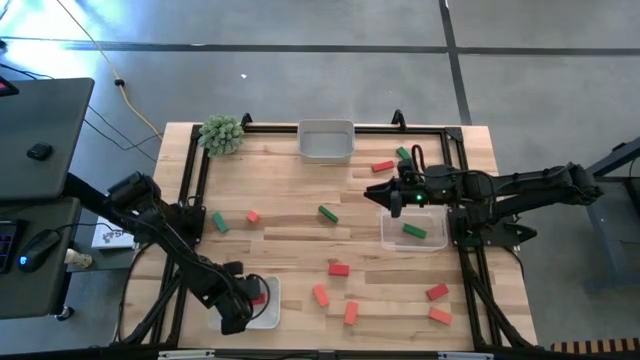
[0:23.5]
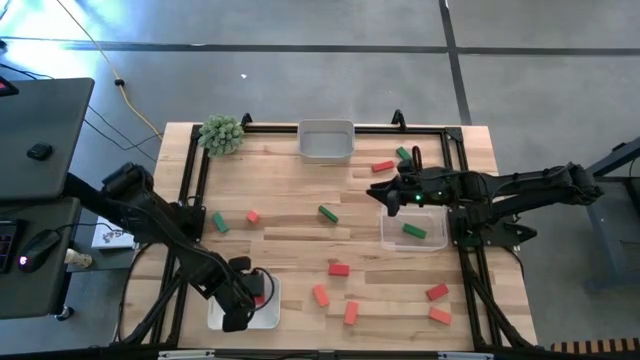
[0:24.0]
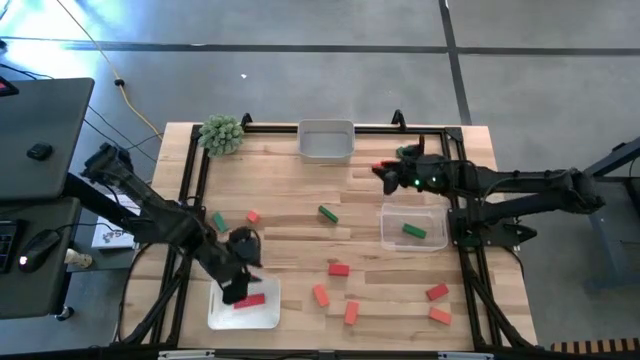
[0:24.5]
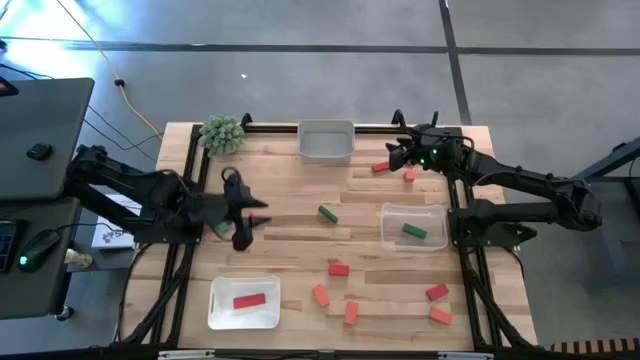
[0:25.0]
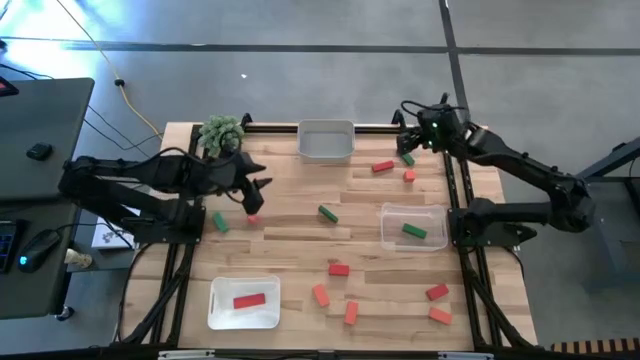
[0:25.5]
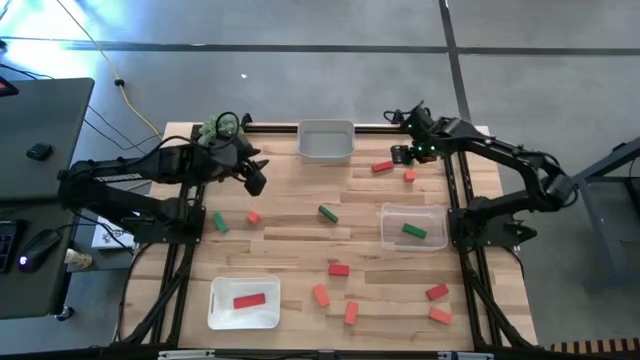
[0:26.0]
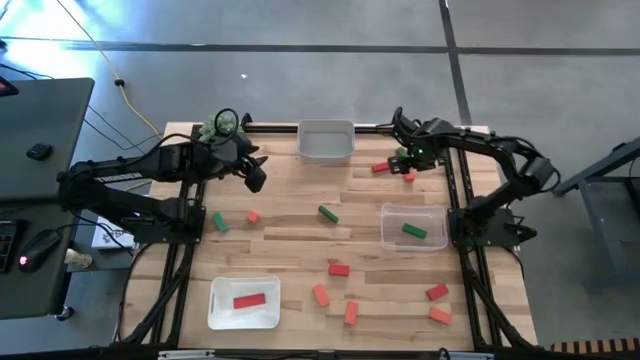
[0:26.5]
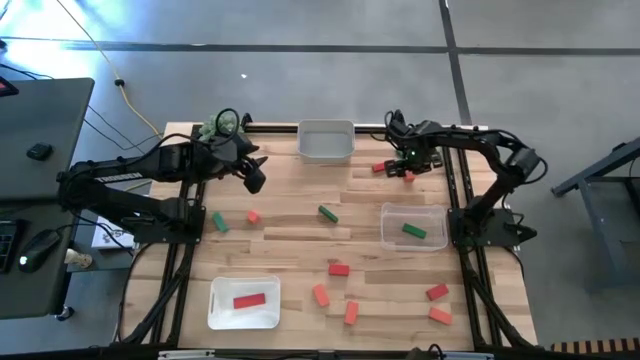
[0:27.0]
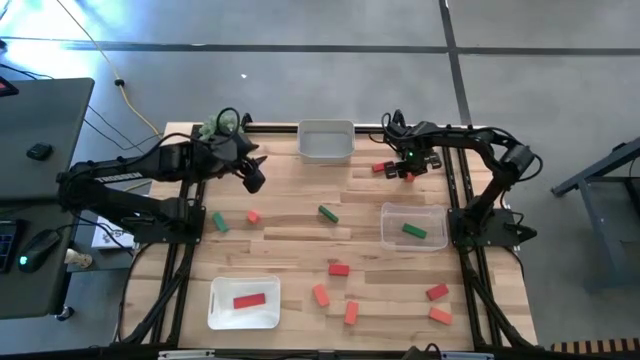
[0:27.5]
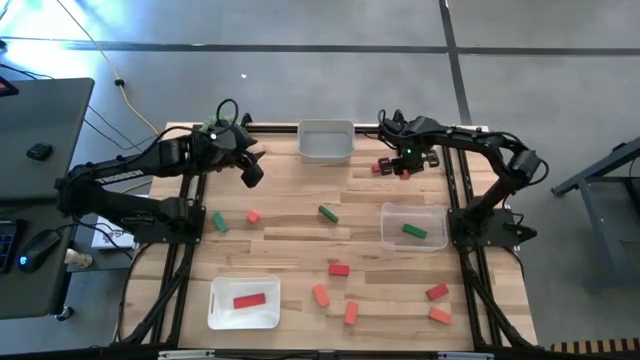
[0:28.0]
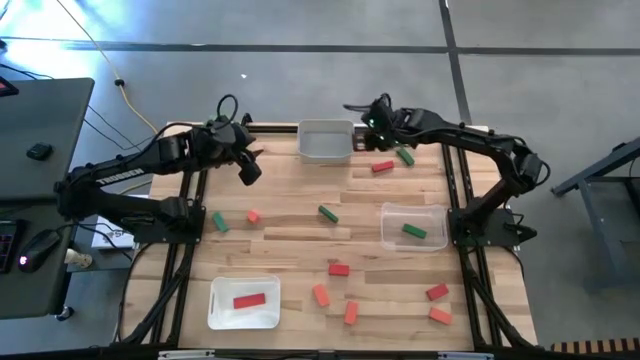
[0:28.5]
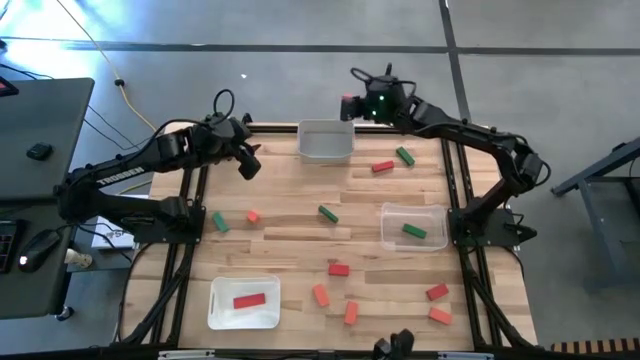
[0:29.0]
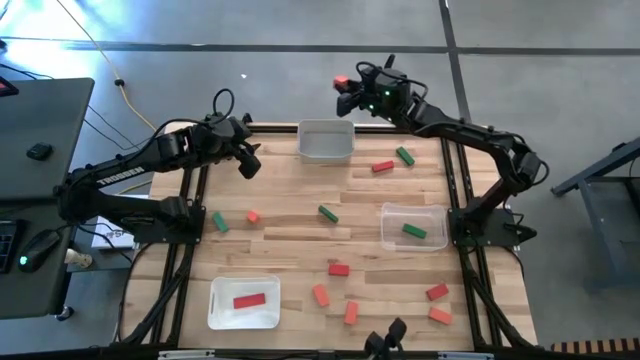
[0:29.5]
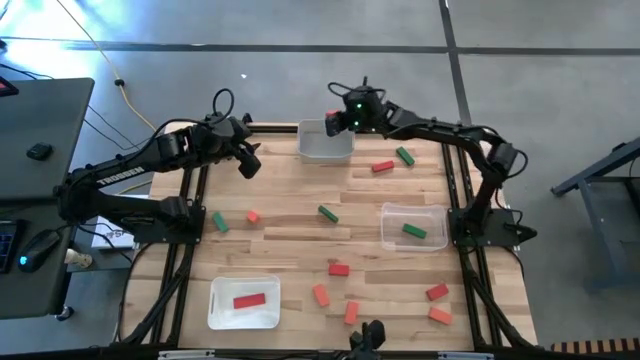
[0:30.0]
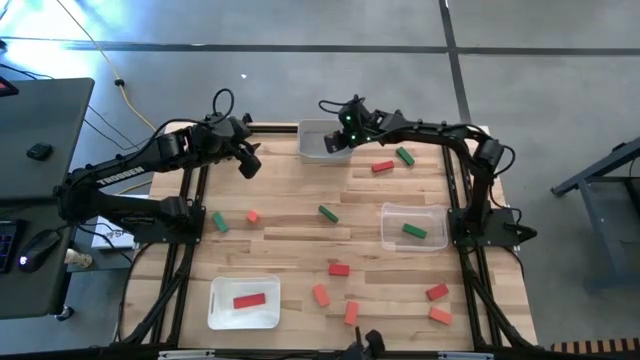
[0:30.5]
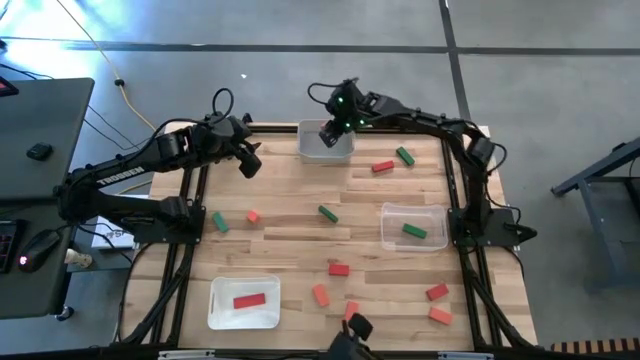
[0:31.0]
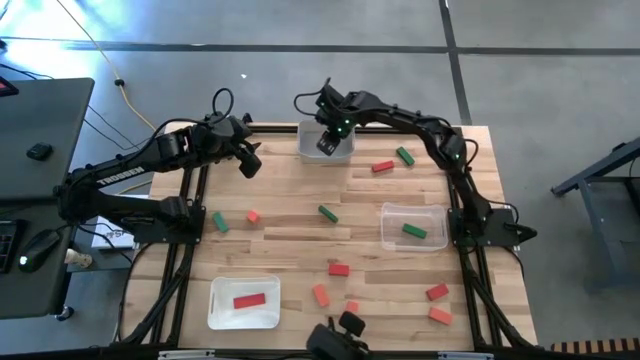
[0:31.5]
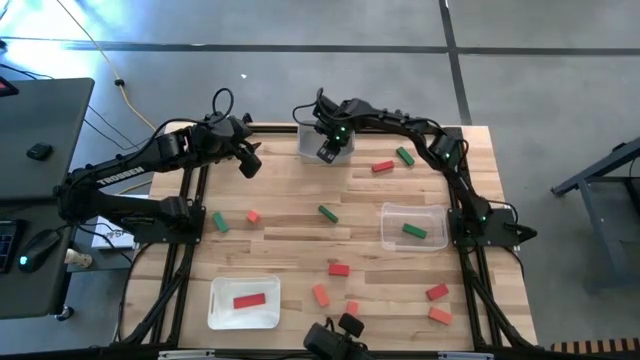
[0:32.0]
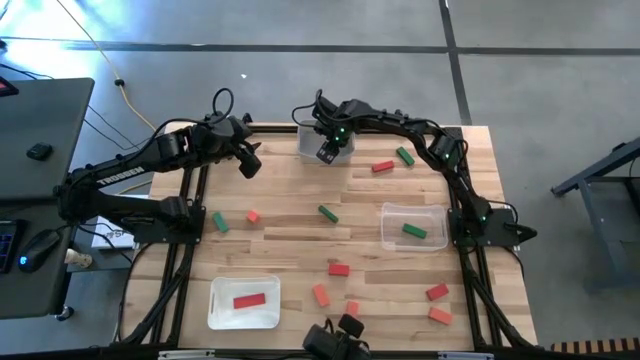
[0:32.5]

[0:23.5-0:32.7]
Task: Sort & place blocks by color
Put the orange wooden block into the gray bin

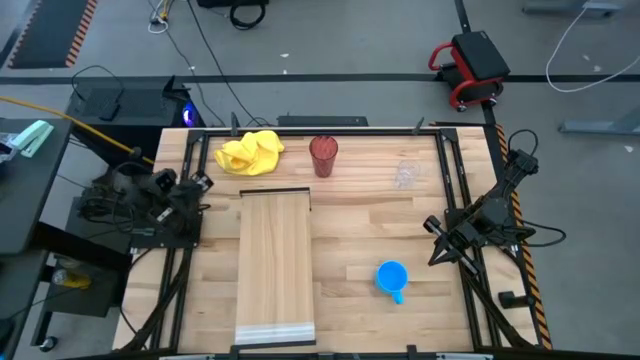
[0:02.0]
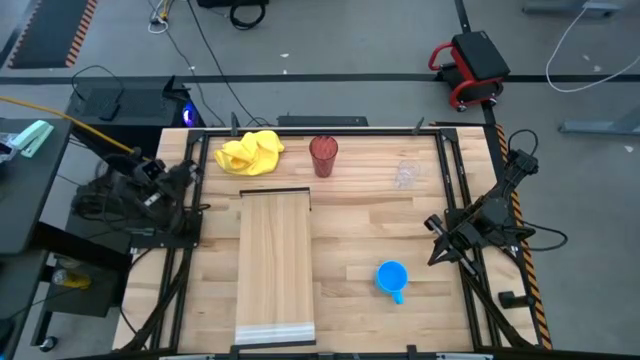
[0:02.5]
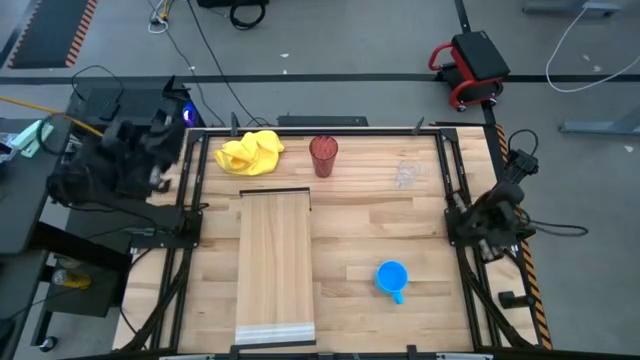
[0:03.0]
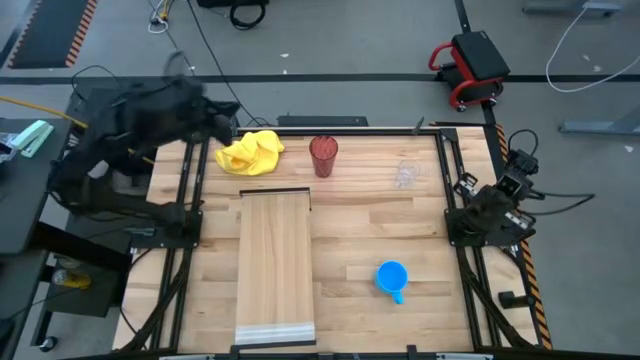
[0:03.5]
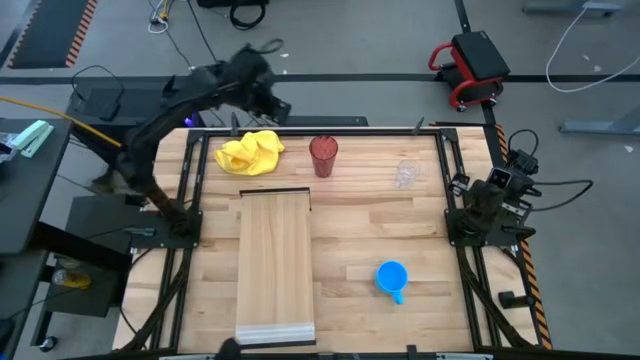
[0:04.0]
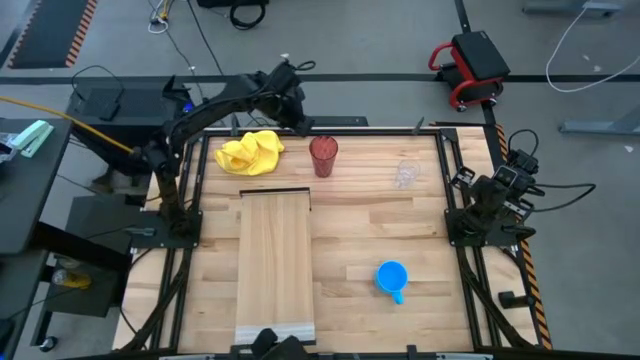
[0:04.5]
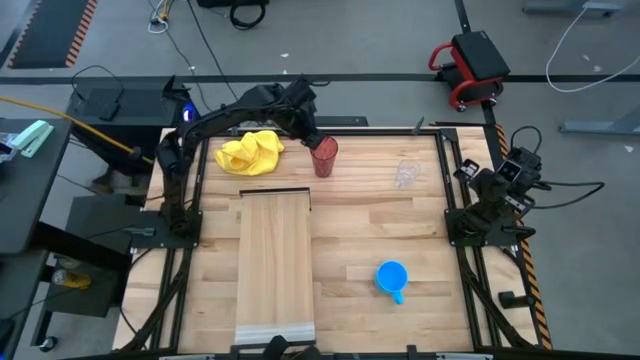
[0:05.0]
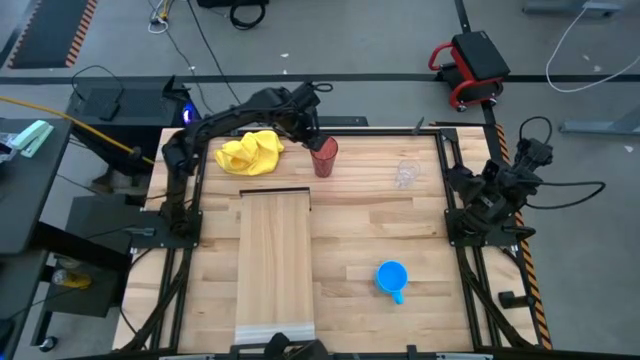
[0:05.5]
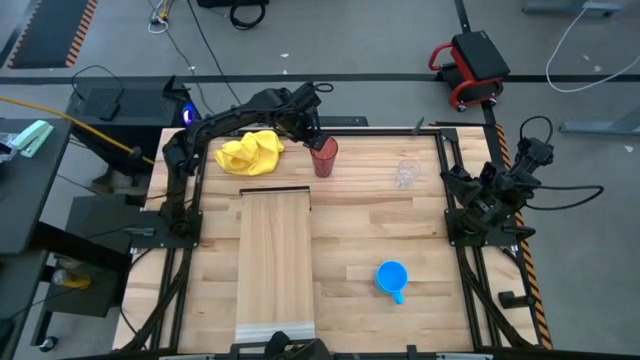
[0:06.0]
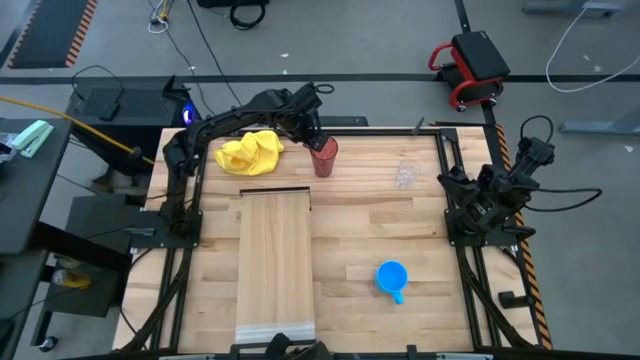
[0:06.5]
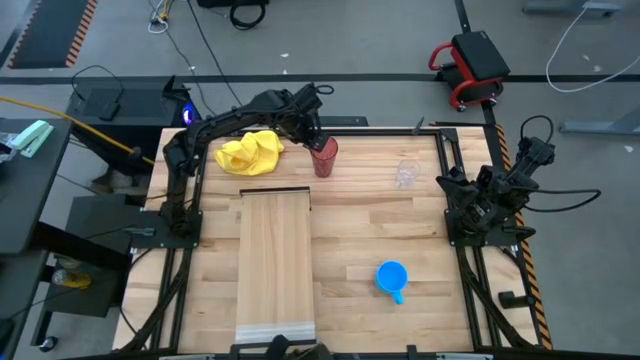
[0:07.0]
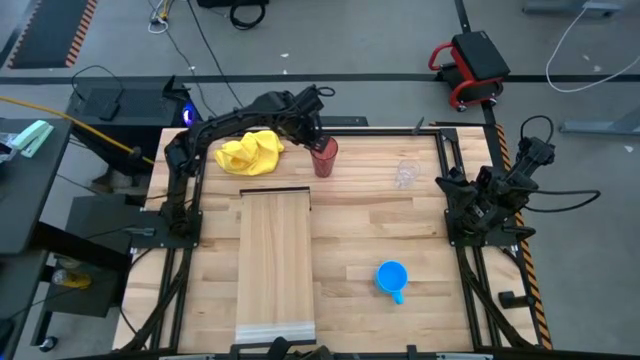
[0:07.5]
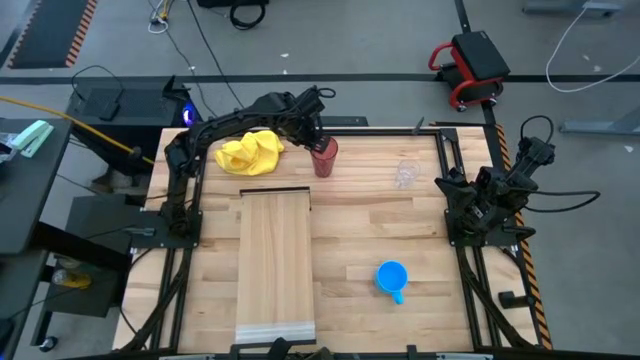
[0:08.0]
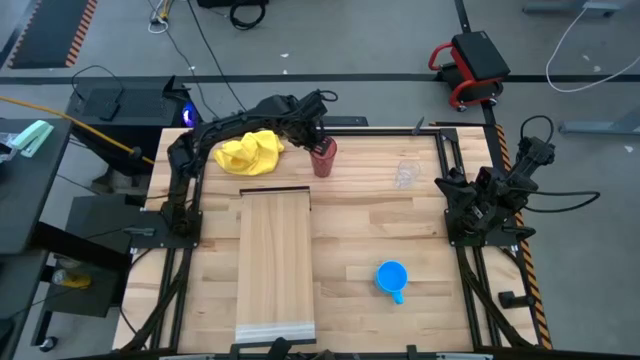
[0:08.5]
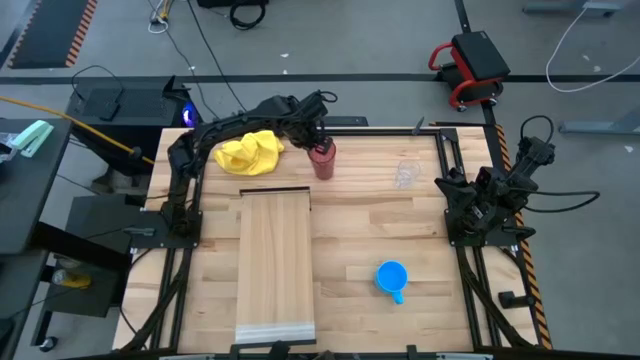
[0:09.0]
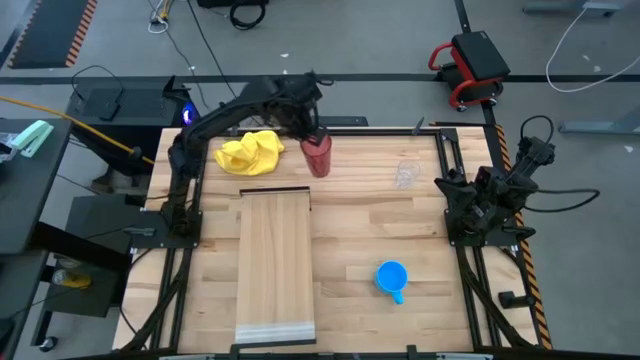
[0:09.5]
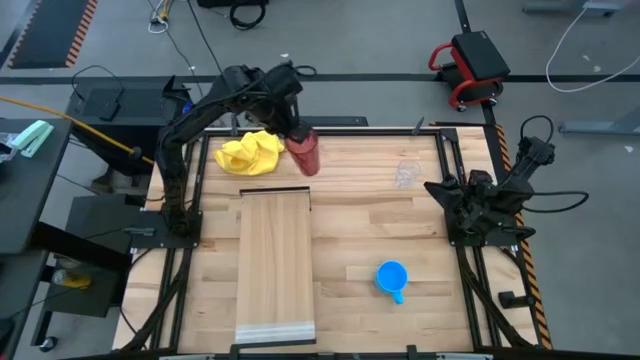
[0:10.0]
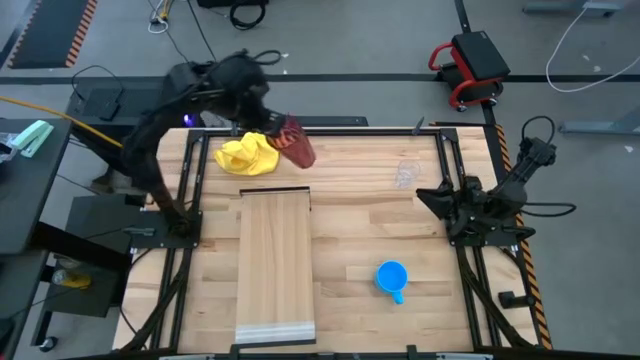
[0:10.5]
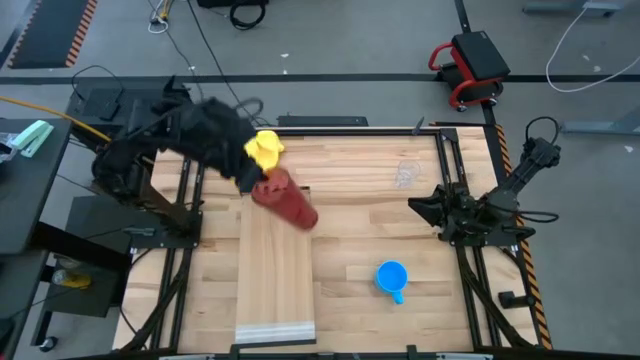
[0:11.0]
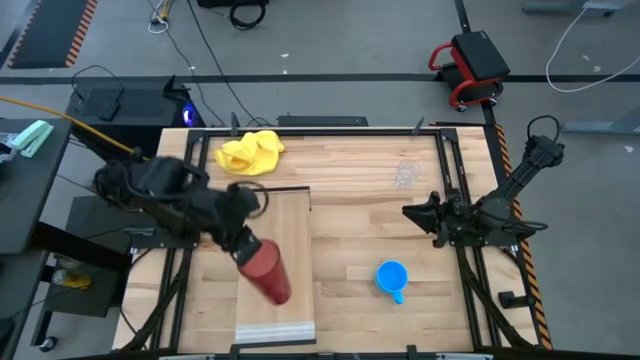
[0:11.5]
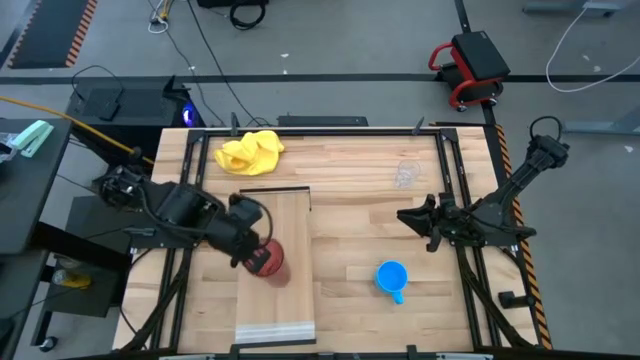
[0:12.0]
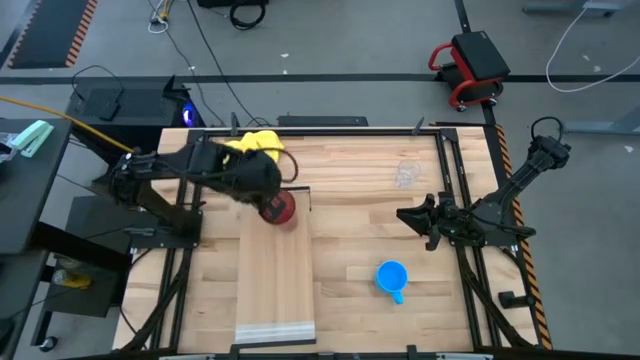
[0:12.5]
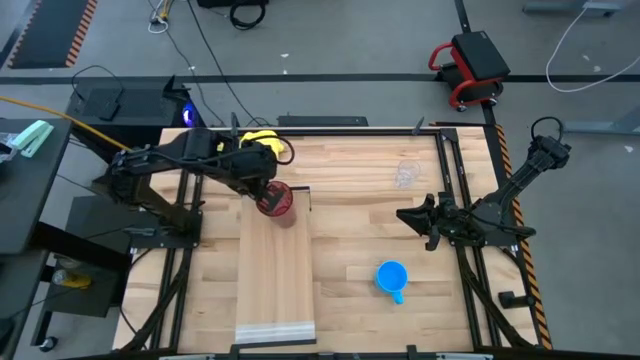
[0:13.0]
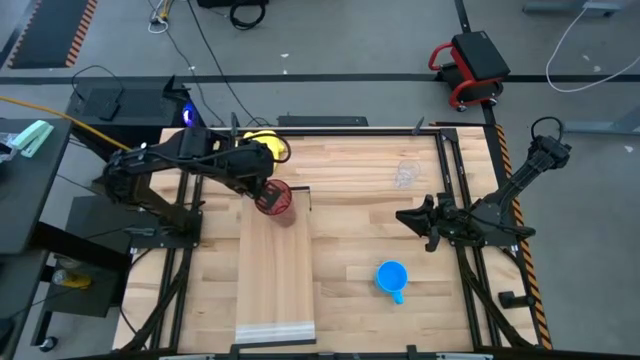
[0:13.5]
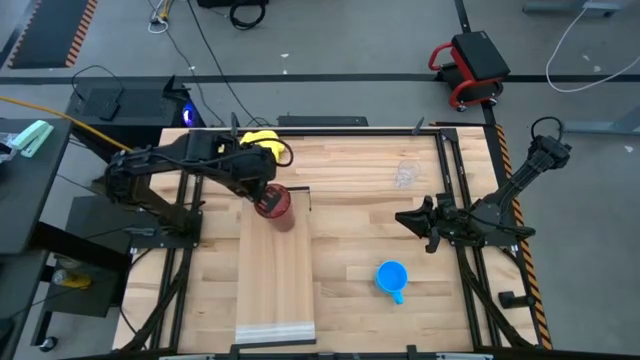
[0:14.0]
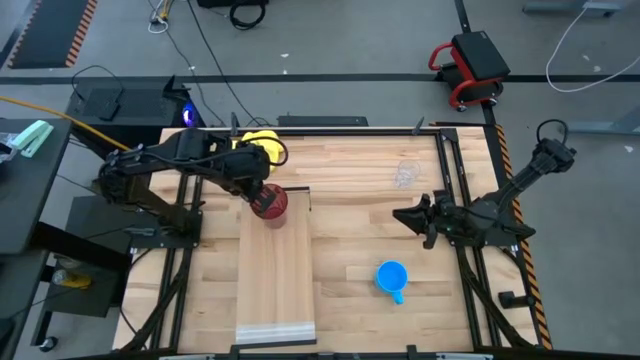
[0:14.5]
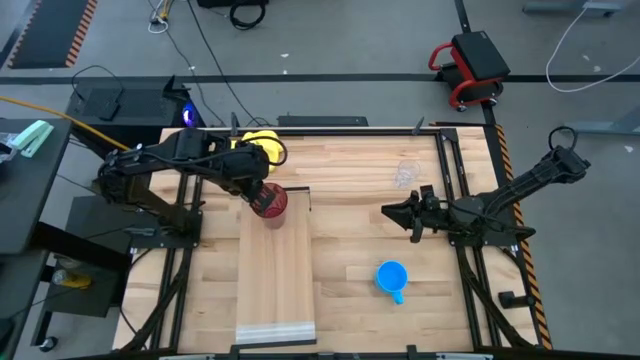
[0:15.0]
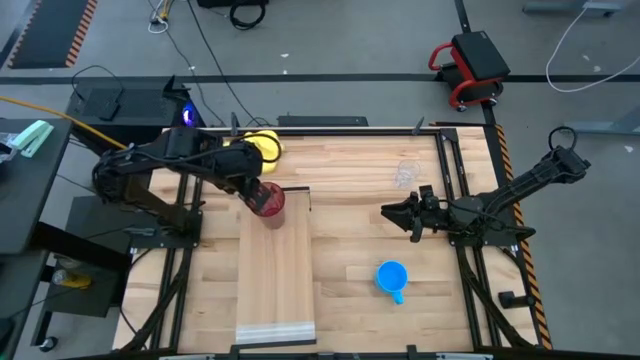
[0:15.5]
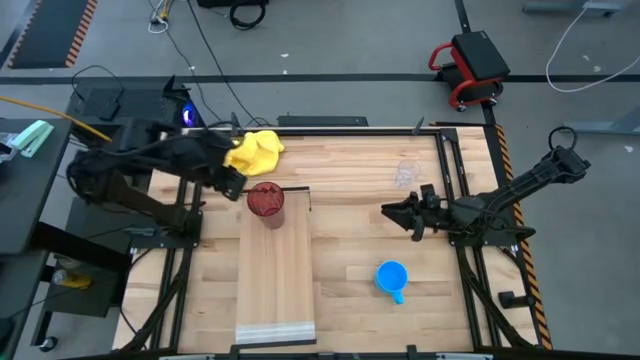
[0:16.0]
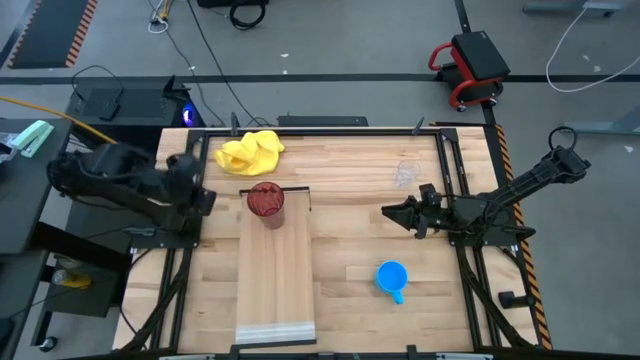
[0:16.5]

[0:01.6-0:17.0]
Task: Stack small to large cups/mugs on shelf
Put the red cup on the shelf
